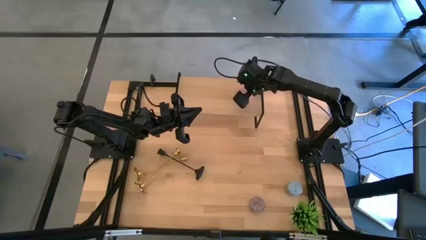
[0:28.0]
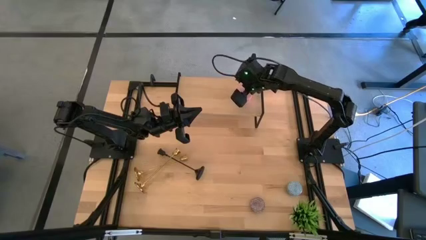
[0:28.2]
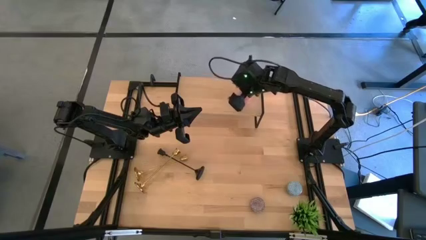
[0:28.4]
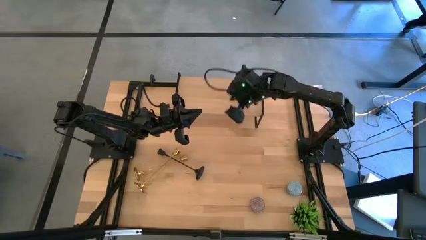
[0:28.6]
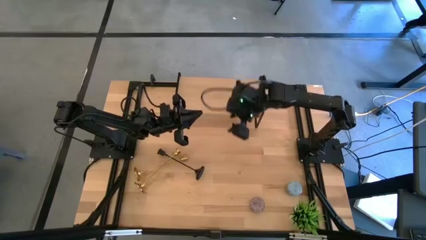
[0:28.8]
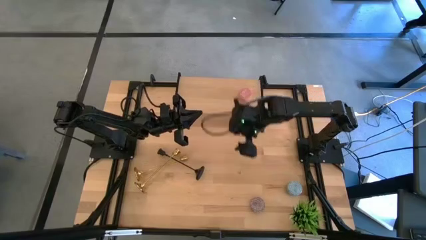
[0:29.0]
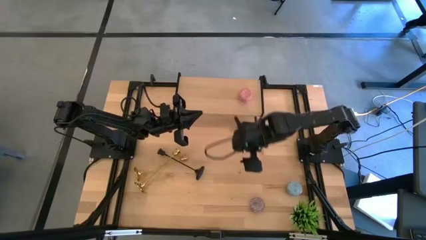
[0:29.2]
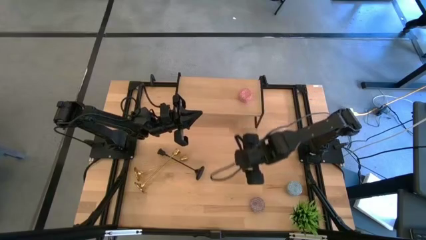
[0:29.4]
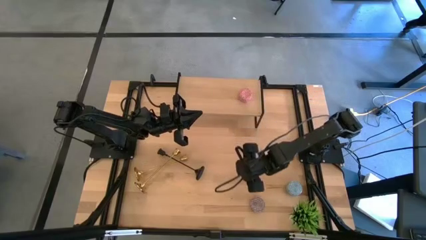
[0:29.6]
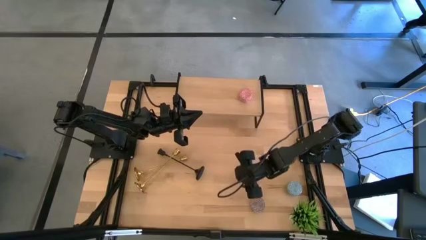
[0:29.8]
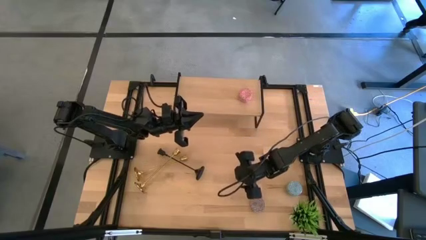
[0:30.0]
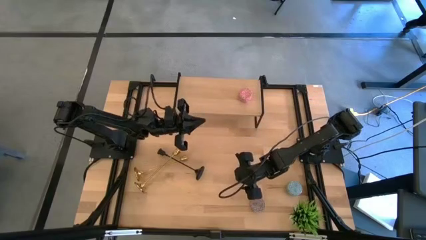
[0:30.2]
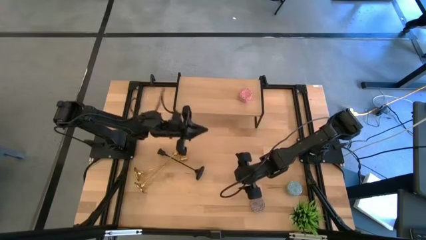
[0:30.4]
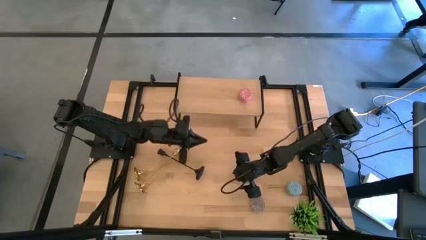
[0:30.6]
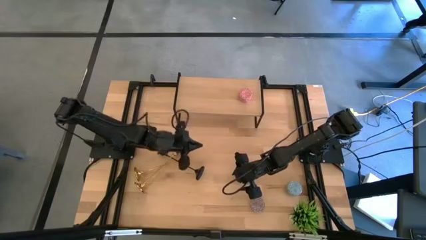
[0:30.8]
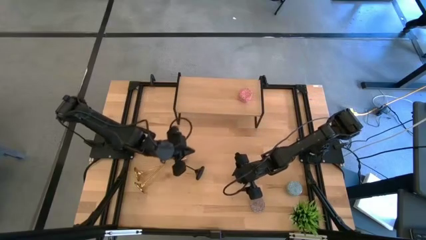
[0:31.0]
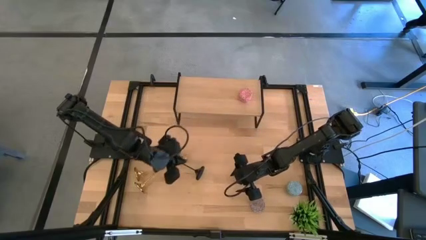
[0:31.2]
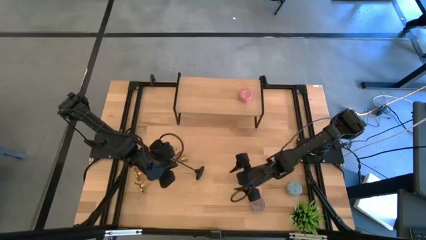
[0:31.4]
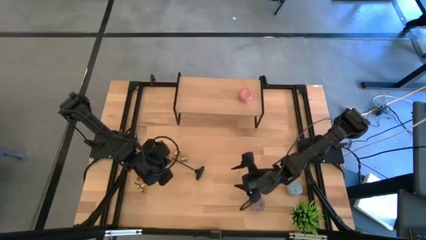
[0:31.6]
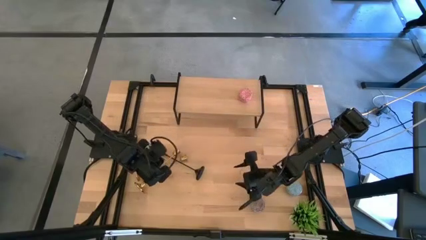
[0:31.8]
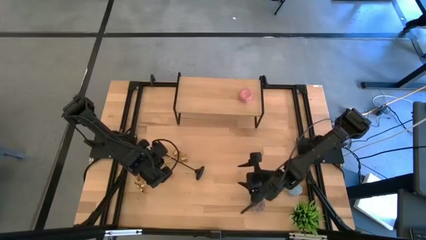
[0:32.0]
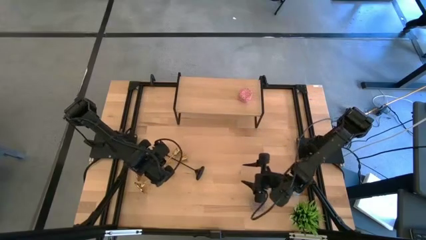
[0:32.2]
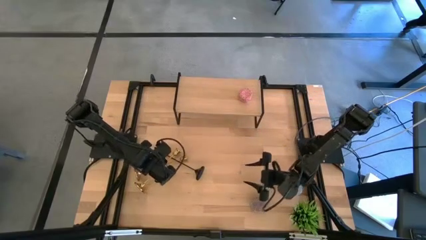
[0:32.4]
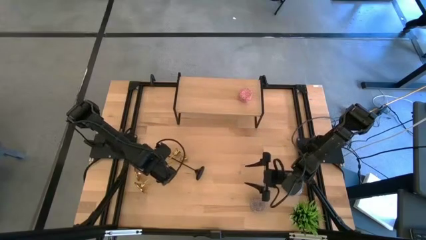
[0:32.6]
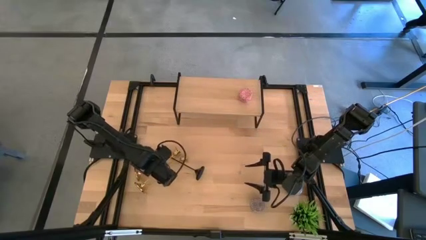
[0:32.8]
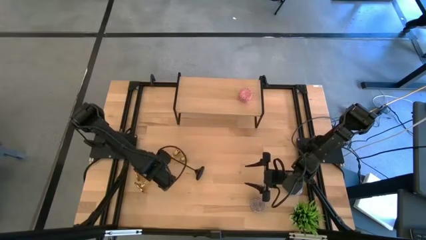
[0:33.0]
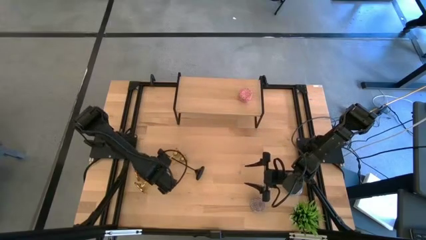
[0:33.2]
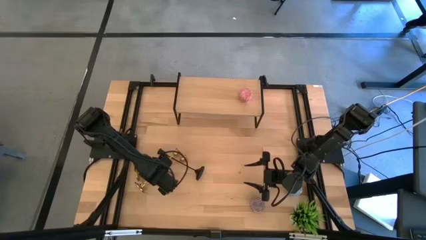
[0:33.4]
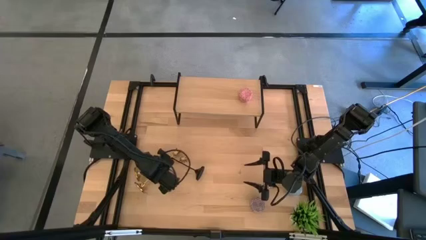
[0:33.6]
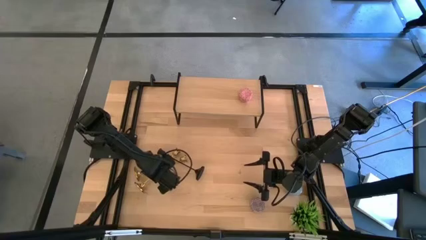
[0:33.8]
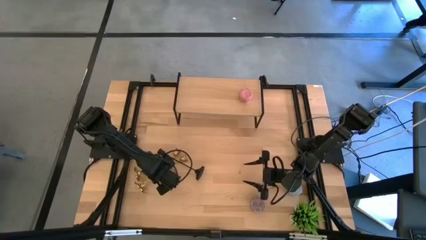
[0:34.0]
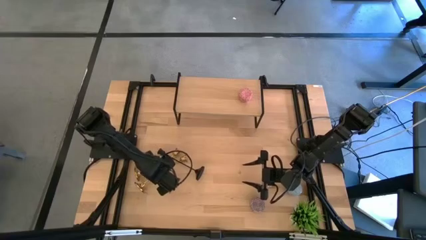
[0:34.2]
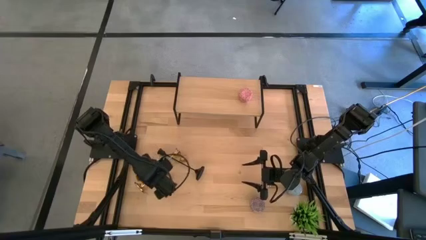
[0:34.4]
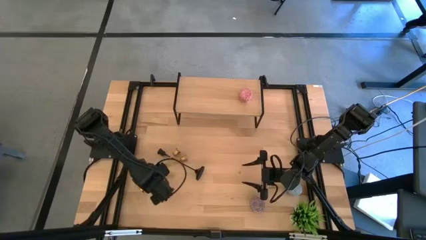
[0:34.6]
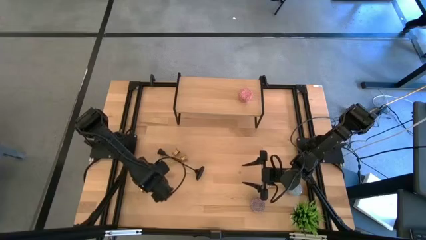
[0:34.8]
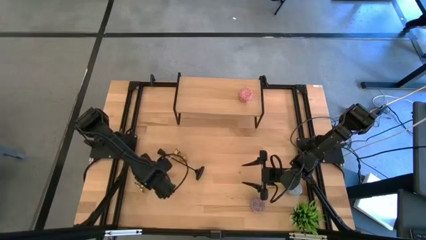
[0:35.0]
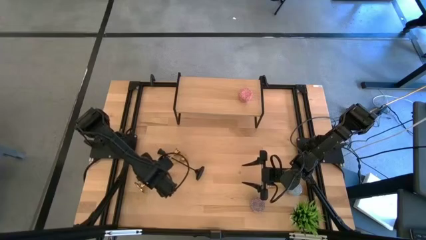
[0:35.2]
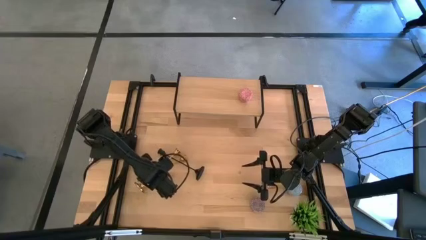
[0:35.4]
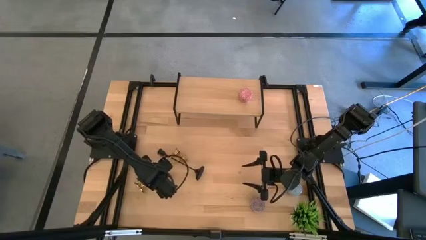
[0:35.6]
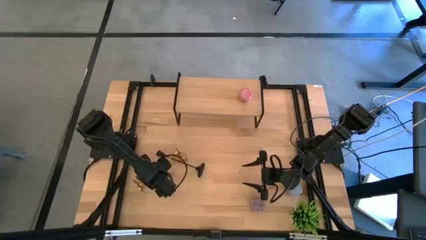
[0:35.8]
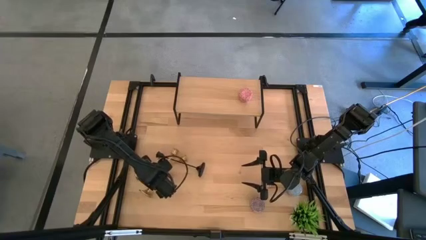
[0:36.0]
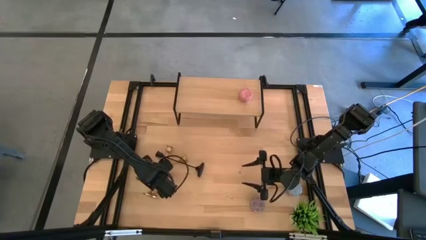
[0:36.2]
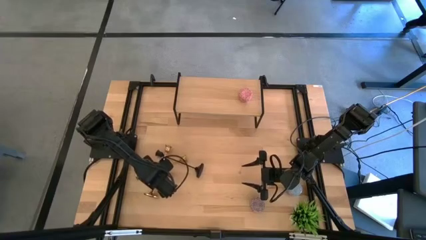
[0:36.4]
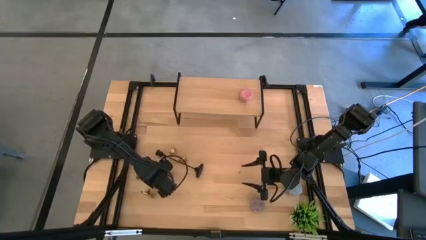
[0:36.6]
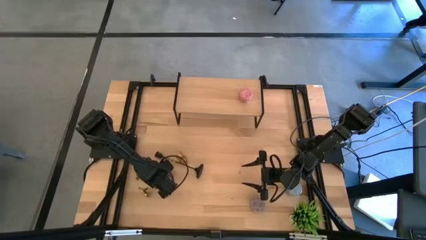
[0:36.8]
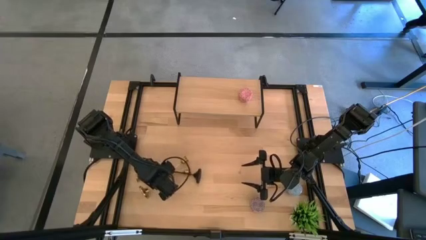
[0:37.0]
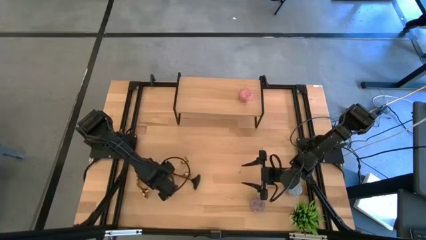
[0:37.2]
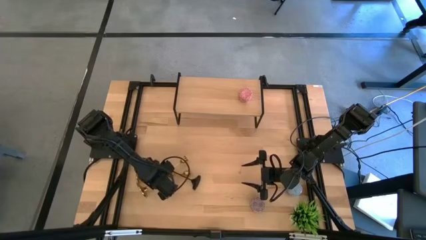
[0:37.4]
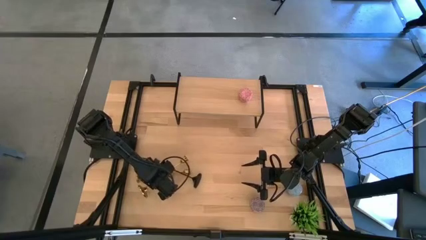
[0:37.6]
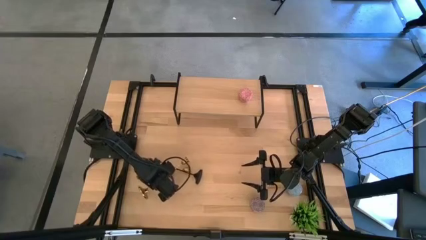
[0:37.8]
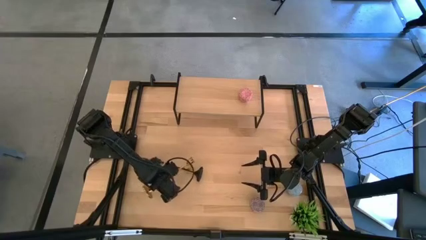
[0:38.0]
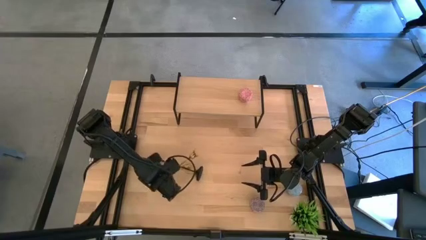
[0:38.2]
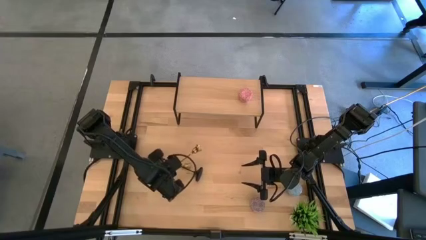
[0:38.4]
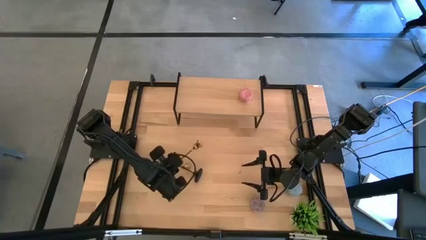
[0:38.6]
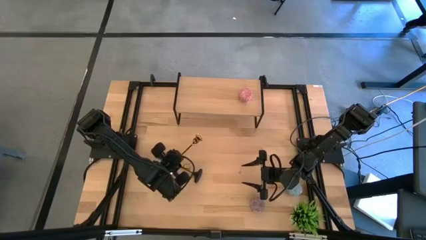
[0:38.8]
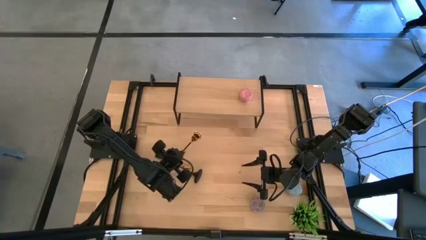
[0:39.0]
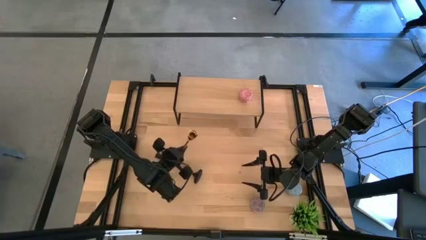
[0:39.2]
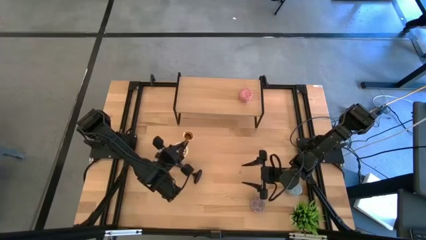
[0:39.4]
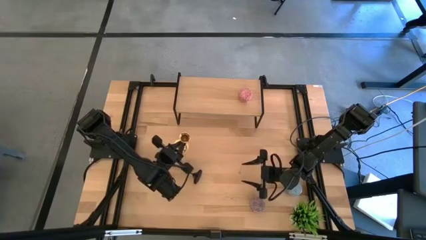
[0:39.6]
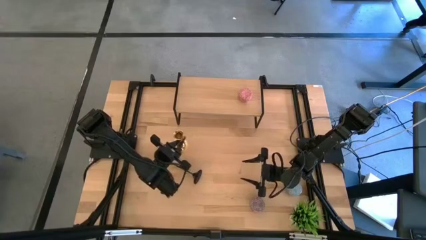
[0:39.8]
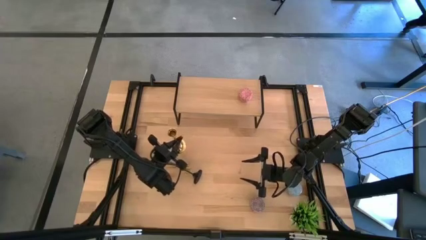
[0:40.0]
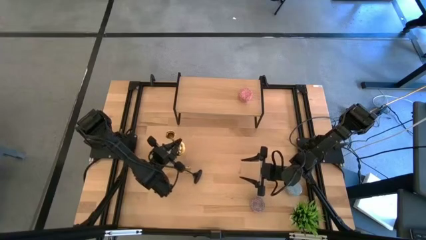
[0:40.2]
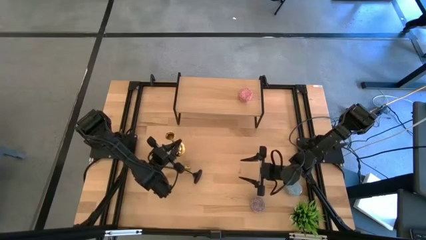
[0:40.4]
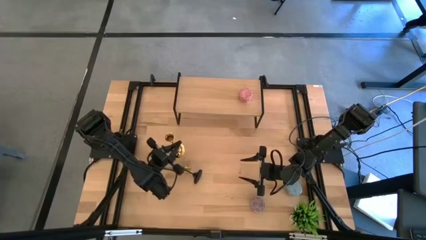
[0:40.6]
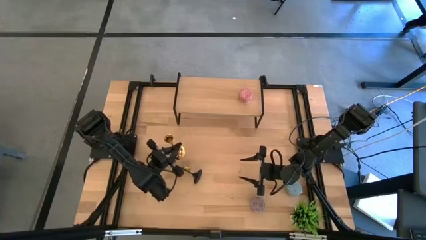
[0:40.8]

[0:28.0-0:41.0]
Task: Pick & Place candle stick holders
Put the gold candle holder on the shelf
